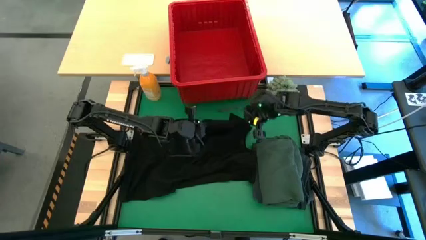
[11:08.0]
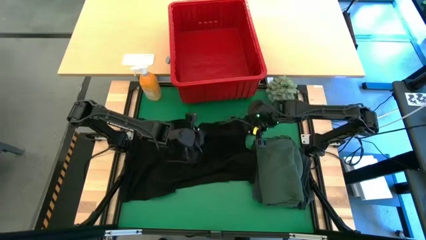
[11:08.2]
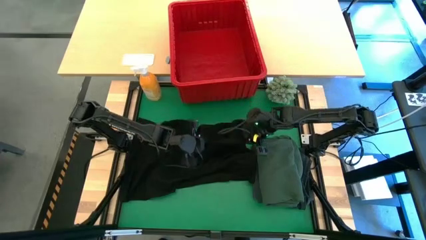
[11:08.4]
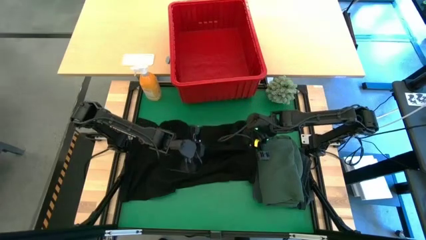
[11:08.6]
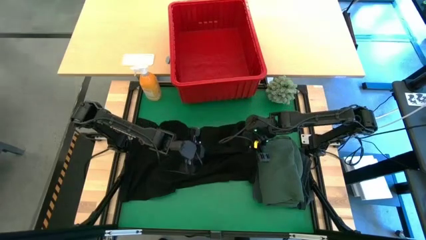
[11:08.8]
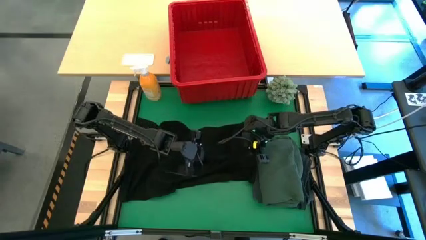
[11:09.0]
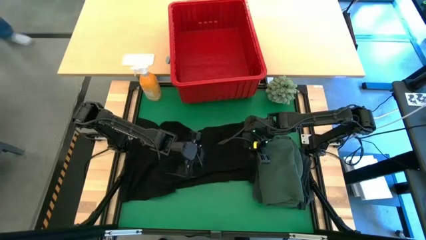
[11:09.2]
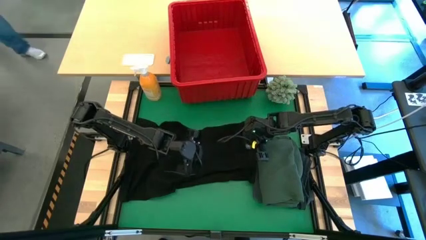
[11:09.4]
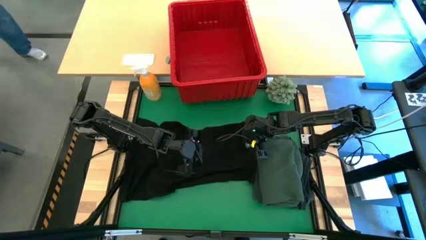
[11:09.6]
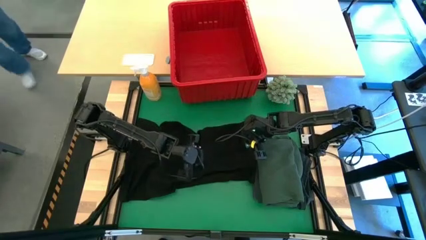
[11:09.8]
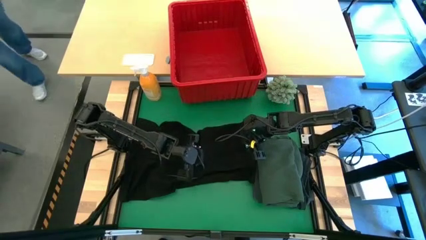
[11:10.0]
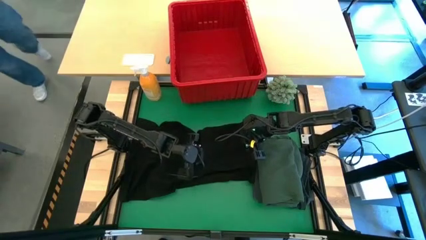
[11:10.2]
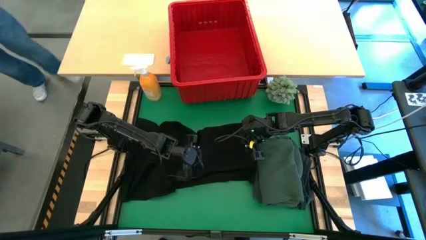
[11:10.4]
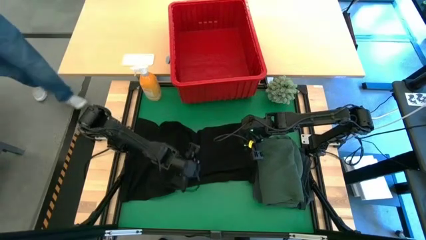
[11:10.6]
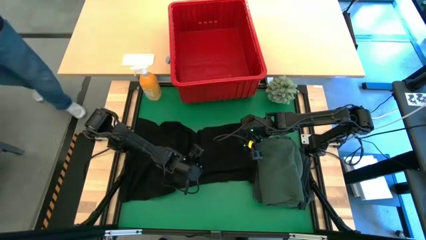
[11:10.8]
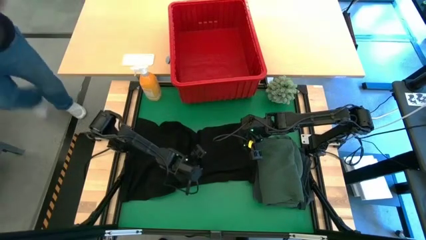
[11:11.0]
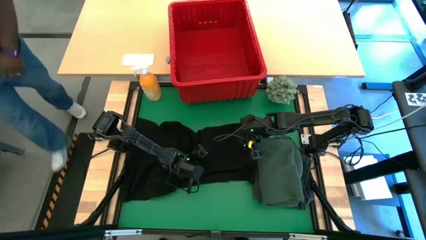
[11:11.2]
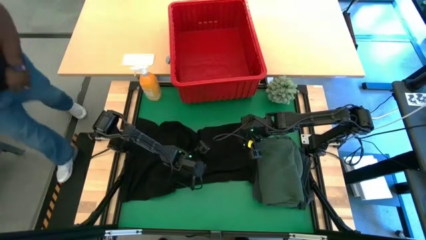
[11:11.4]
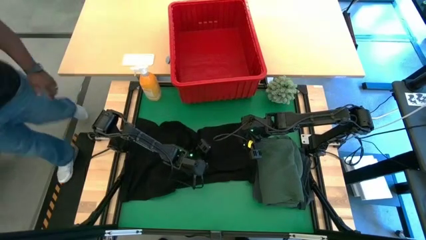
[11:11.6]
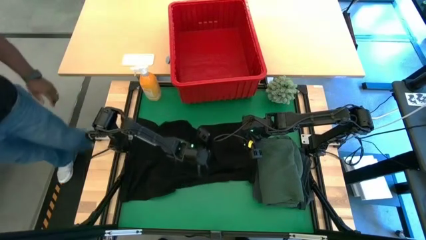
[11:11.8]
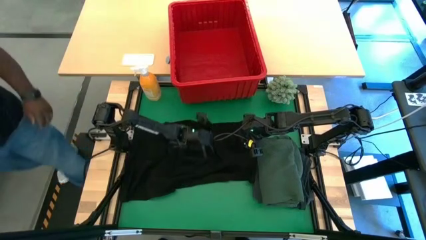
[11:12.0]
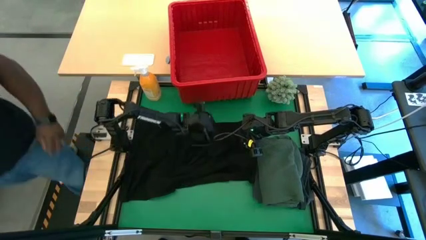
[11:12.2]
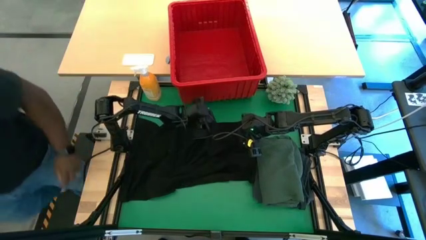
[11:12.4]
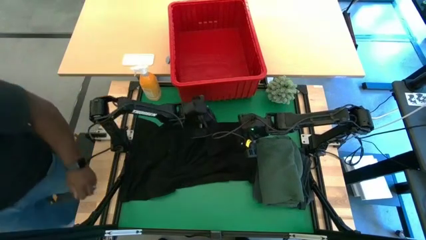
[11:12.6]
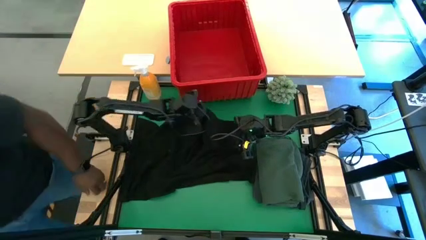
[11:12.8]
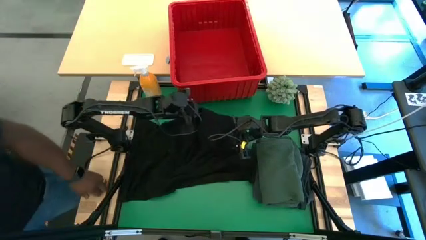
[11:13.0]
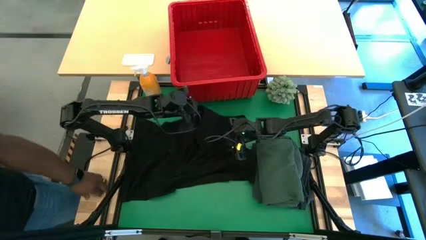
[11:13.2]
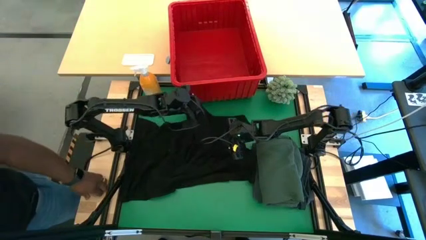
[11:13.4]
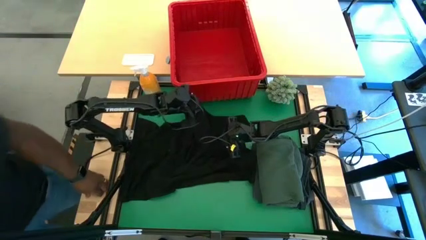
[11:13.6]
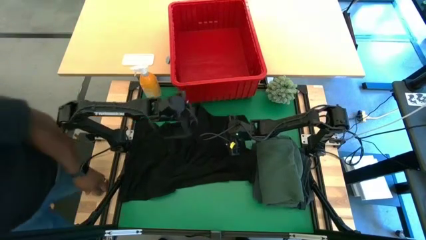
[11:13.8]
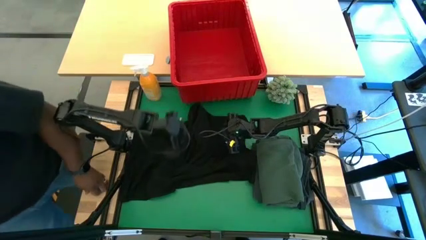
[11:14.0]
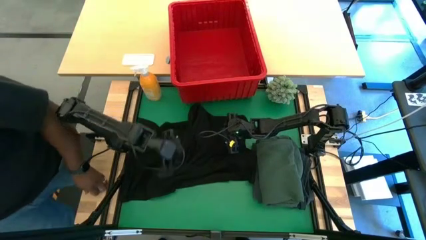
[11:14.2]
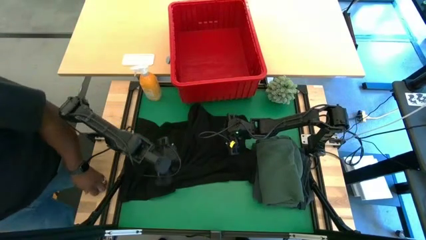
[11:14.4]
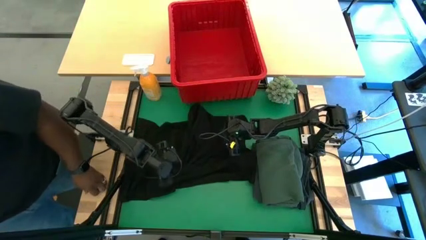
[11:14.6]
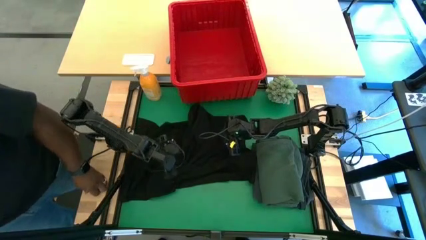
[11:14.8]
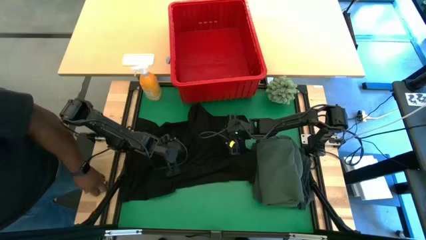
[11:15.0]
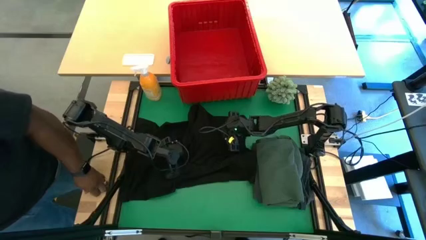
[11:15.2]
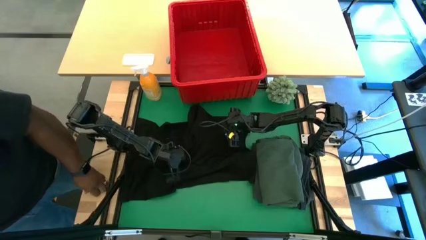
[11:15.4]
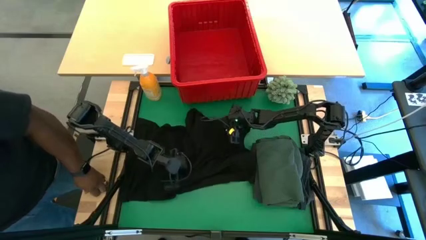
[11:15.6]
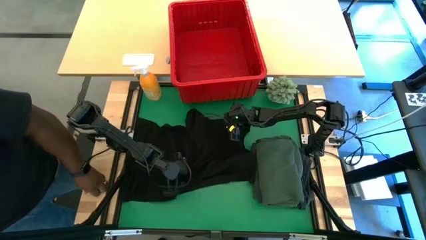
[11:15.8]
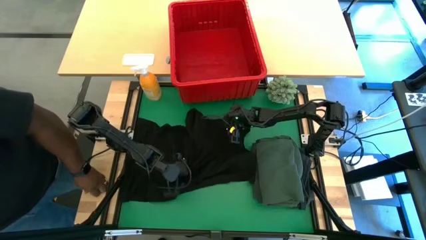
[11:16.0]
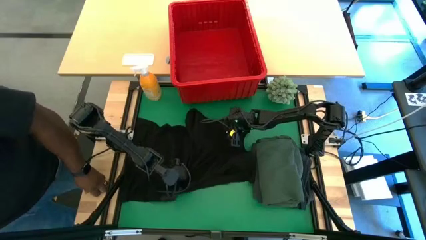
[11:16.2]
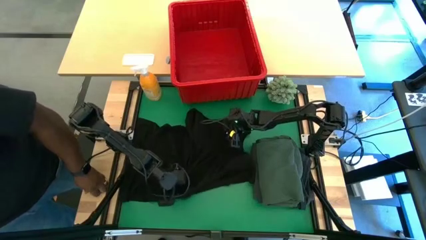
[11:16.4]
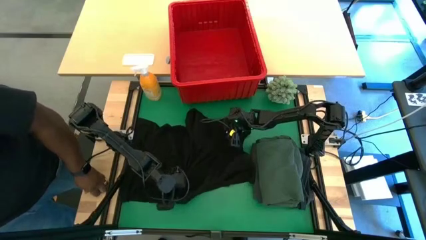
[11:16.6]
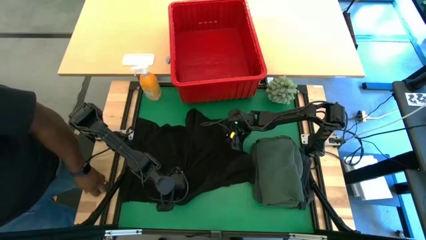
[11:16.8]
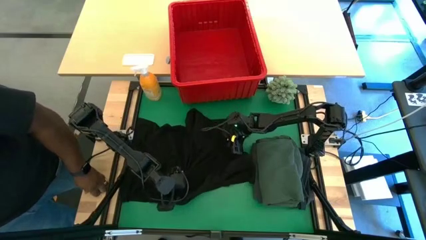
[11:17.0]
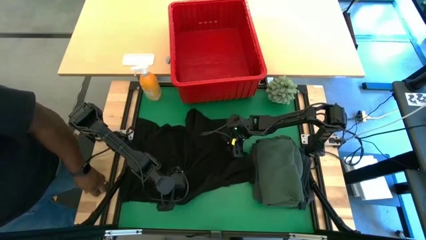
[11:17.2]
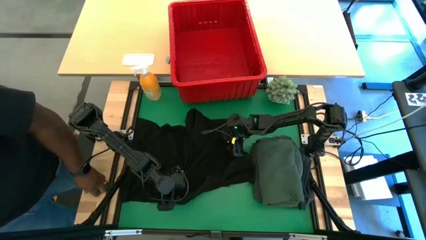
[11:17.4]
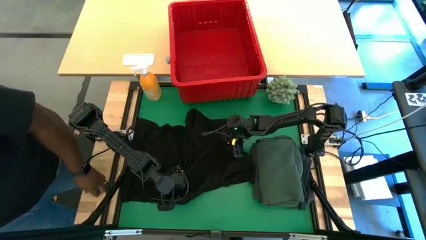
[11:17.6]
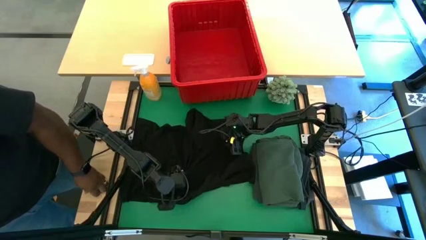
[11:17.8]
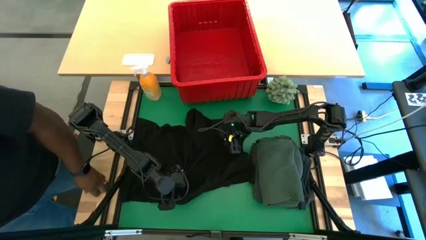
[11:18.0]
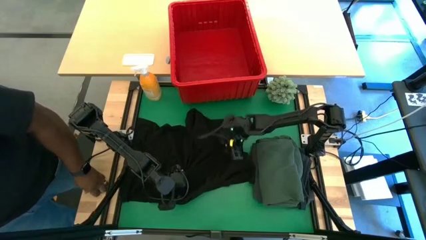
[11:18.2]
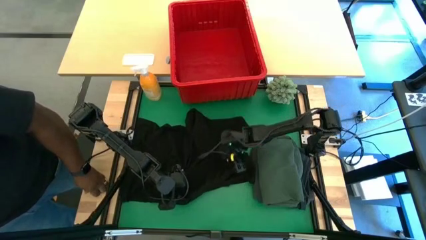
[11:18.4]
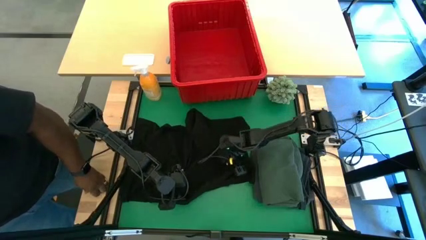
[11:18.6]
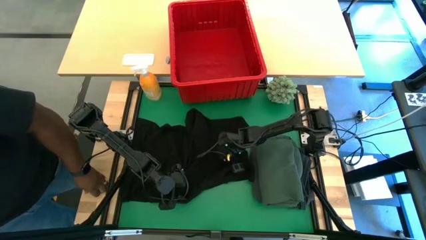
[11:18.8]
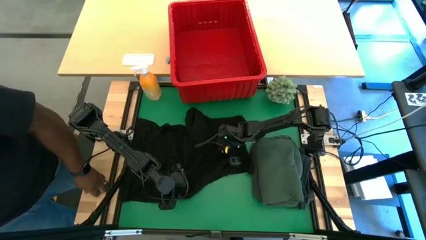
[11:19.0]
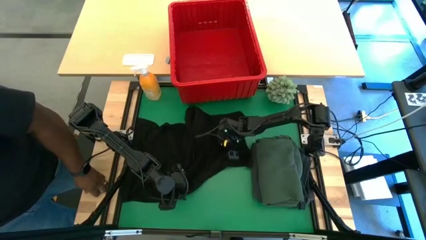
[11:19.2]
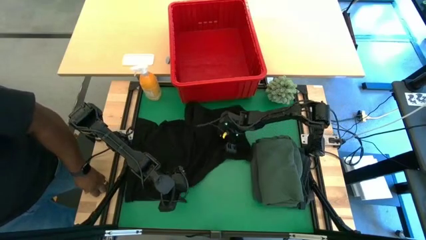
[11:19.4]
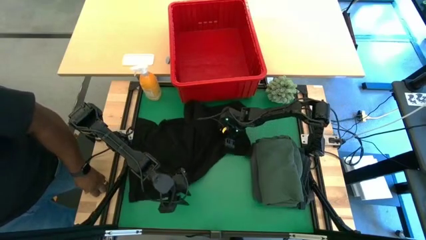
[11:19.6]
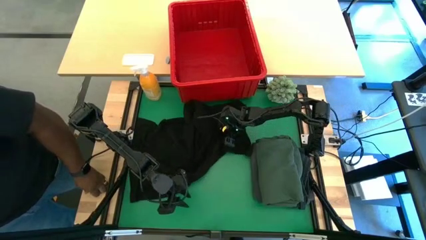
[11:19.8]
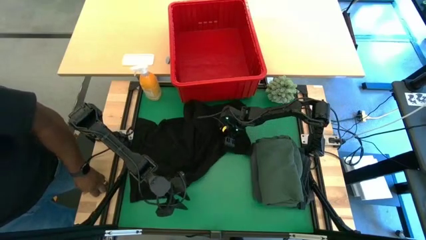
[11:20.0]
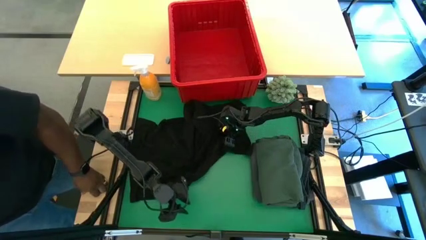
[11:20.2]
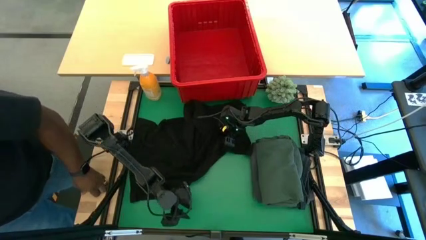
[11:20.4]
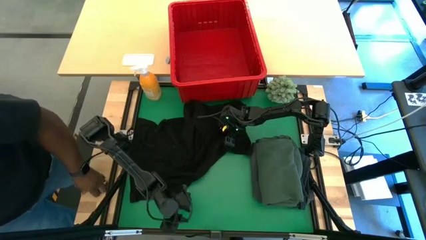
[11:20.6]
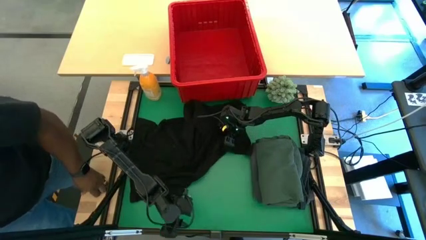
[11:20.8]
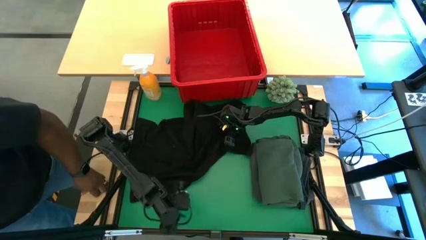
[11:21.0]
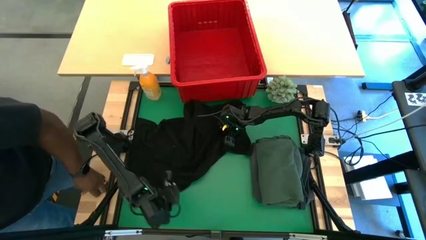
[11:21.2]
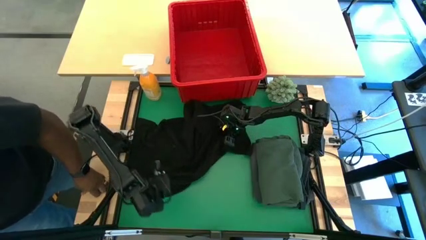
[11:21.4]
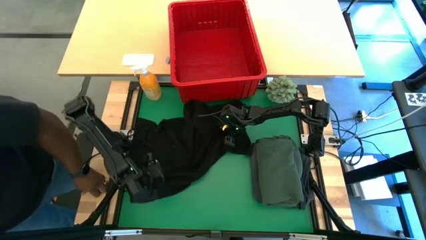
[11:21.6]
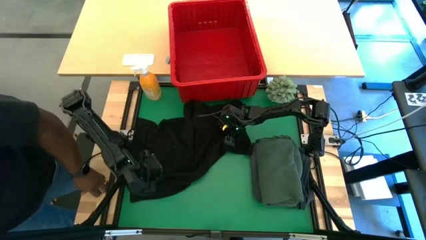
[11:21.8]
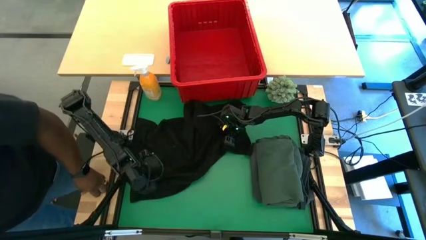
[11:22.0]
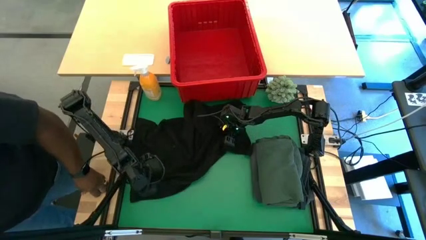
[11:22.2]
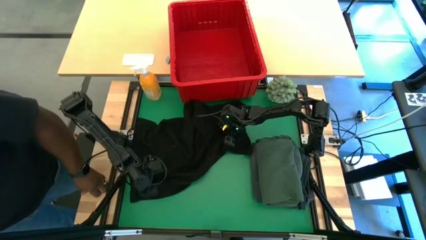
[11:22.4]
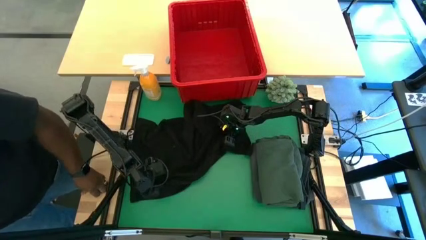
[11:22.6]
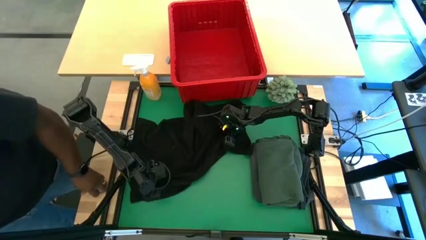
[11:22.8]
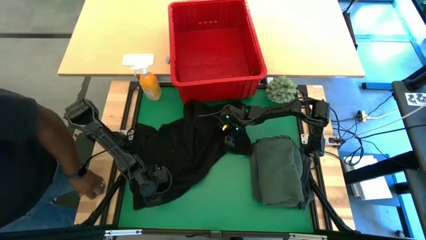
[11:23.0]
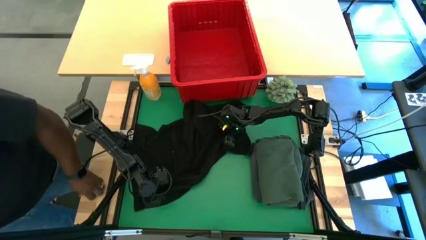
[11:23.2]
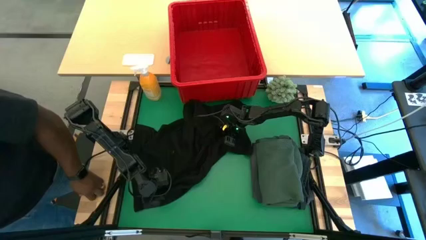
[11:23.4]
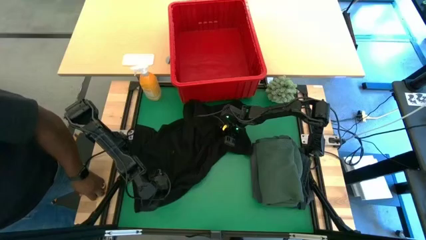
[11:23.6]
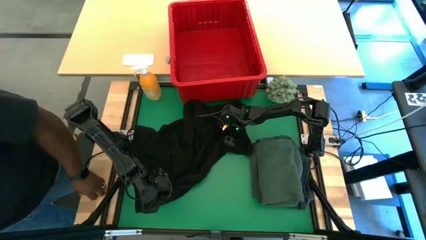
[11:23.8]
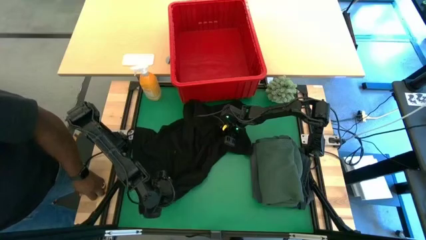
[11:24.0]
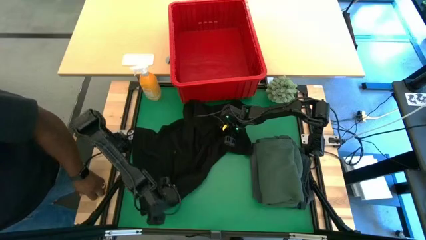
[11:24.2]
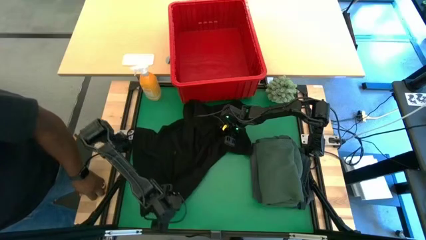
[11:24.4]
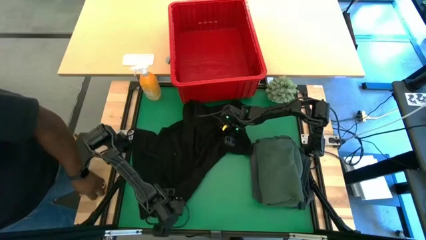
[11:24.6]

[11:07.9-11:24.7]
Task: Fold Laundry from Bin
Fold the black shirt
